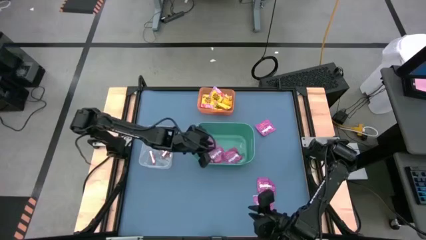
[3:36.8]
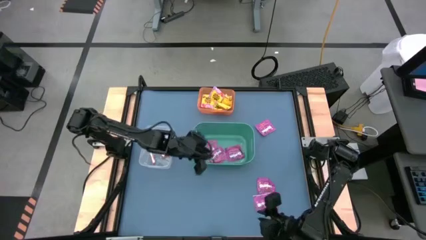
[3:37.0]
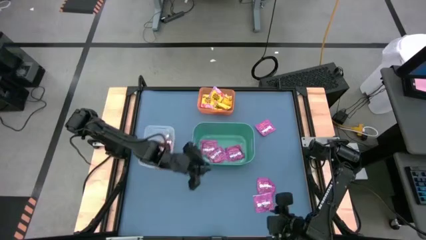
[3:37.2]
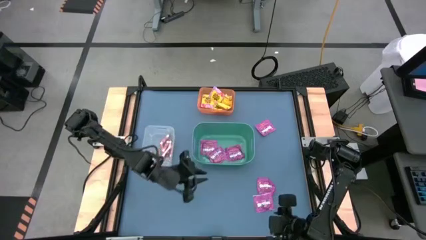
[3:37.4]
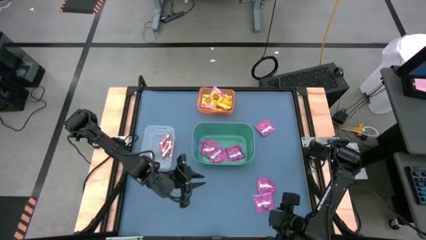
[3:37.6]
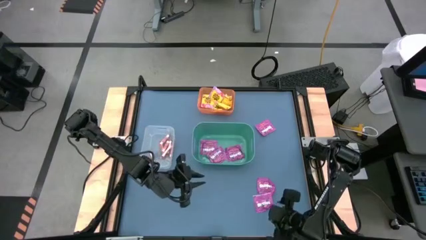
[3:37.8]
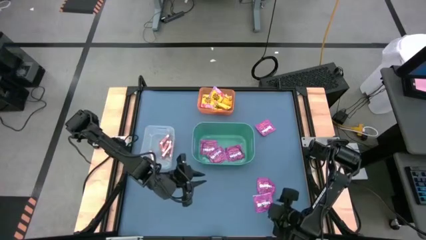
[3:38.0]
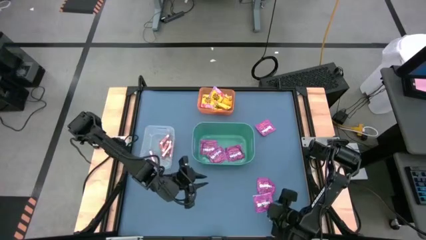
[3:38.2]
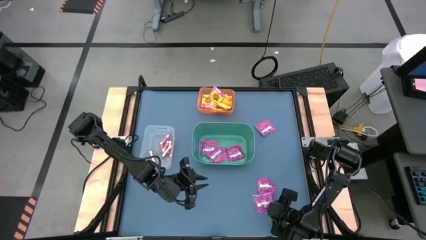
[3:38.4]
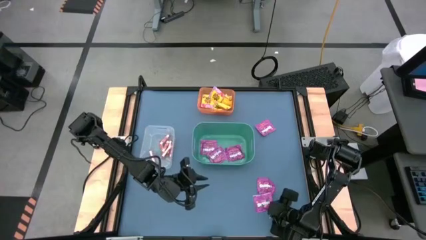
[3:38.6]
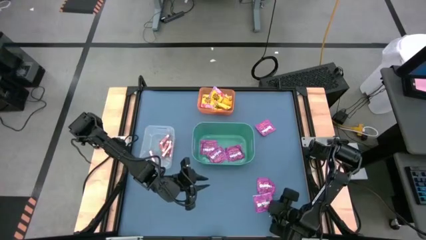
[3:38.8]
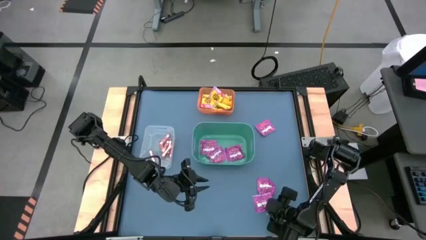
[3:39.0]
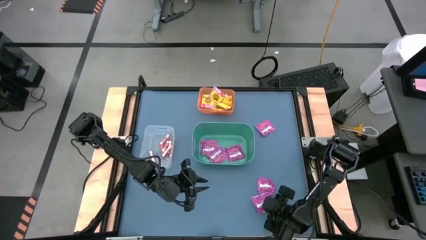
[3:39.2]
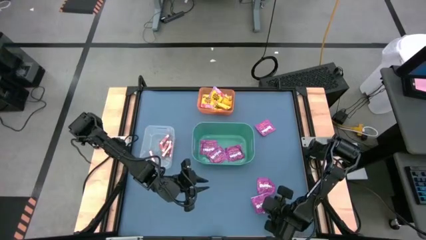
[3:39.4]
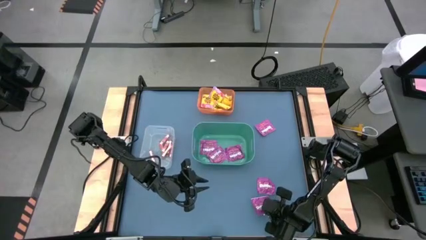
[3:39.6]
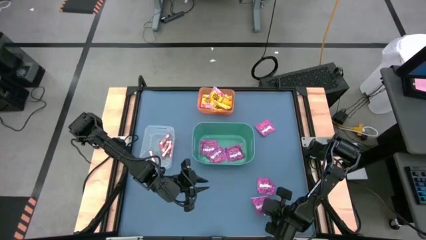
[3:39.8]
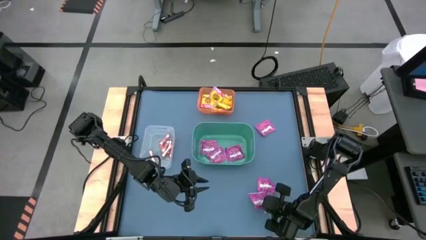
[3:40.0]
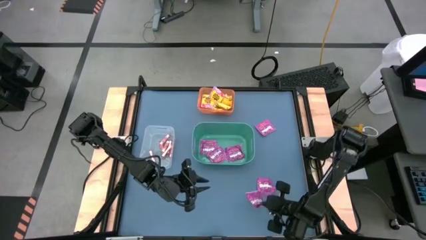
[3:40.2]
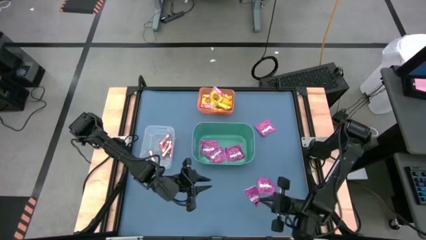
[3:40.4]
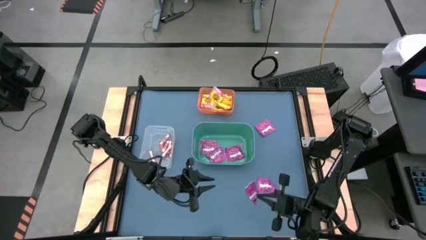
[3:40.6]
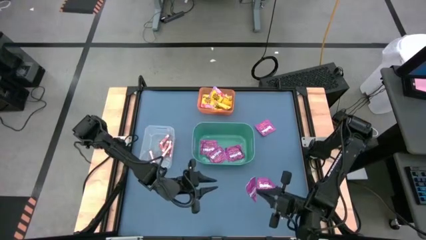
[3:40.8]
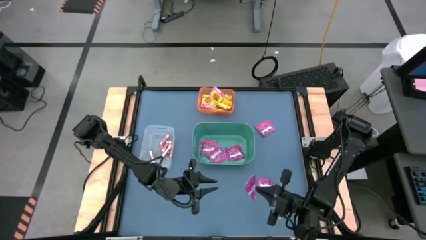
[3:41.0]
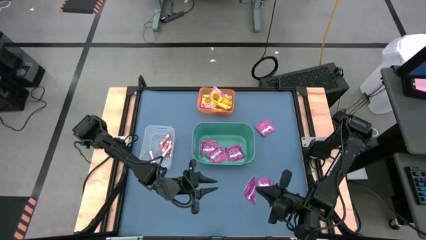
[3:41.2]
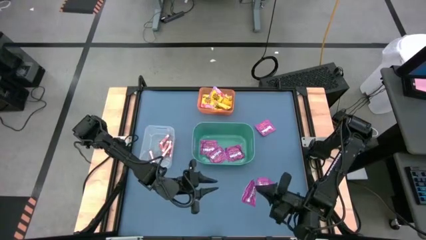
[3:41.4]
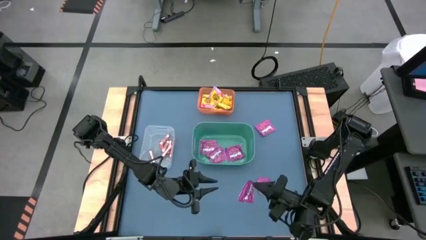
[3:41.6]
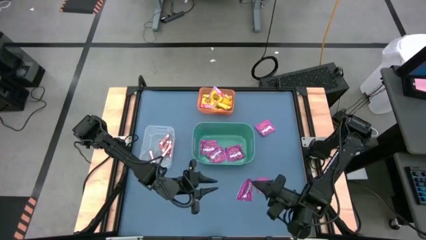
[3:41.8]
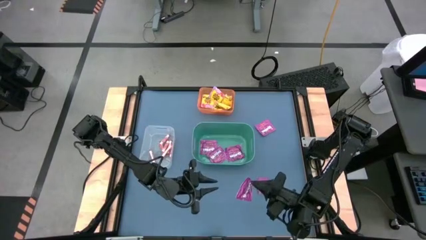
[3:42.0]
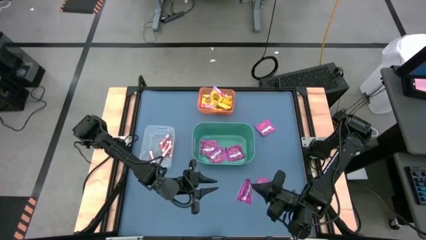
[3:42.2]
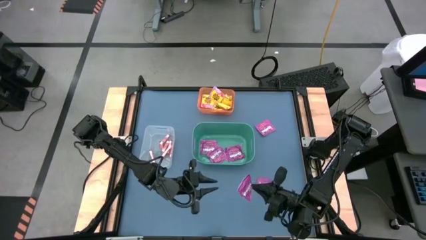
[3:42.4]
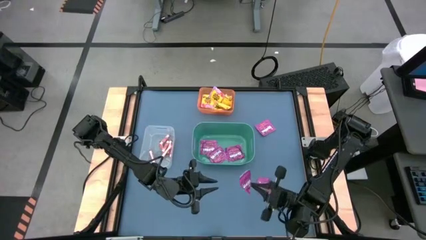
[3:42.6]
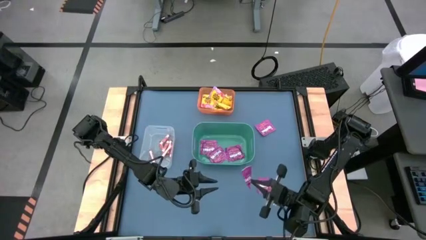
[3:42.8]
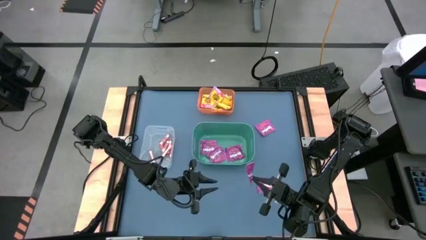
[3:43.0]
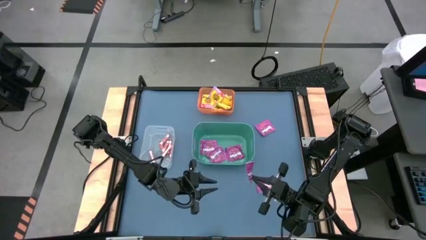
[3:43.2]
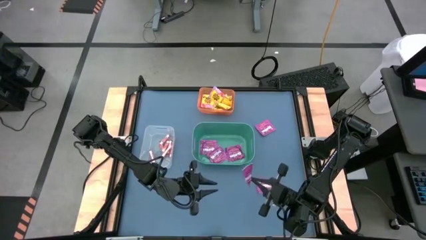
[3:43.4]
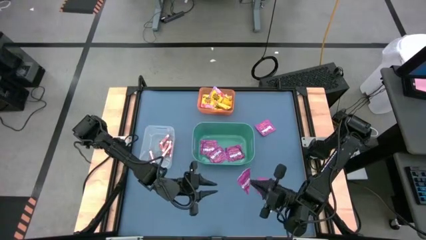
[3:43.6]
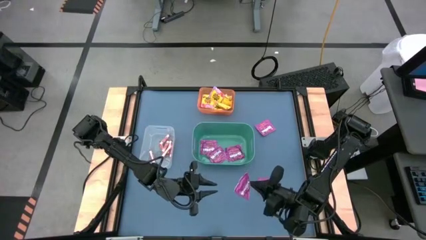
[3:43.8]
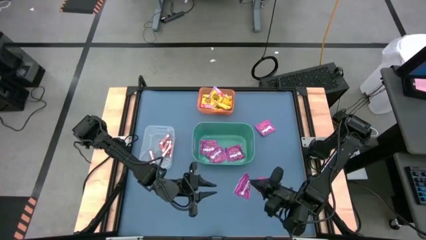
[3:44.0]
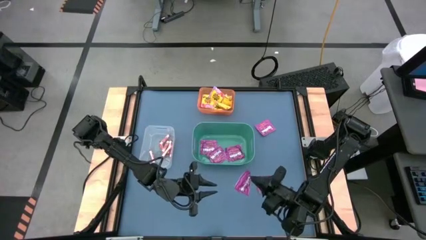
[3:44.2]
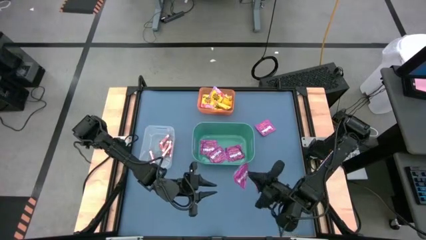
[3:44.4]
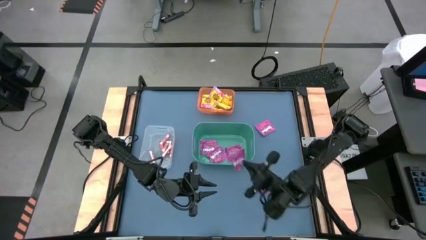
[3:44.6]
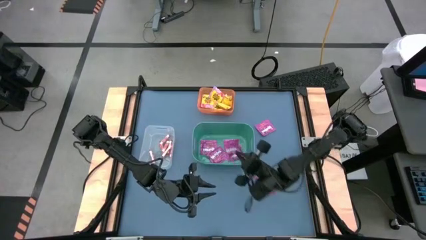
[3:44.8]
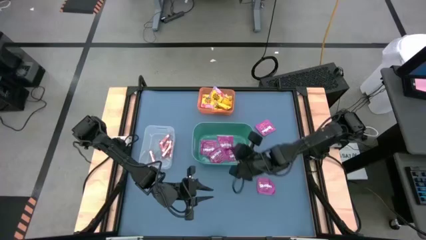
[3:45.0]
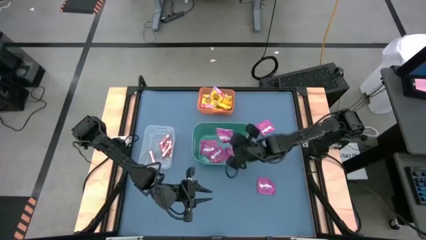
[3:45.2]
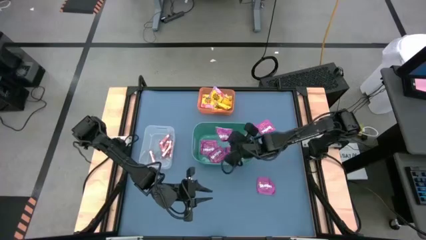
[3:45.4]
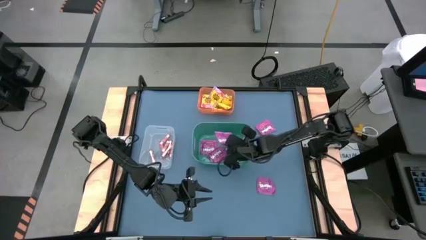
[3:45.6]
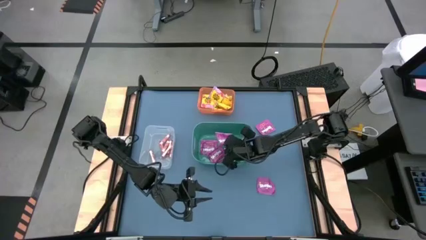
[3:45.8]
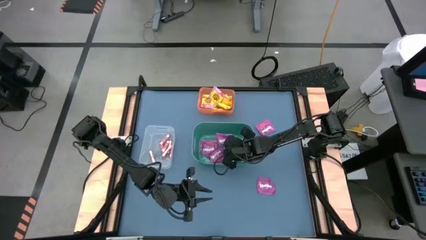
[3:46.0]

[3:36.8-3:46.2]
Task: Sort candy
Put the purple candy into the green bin

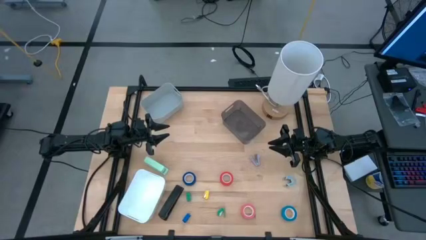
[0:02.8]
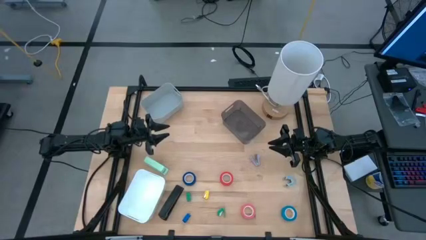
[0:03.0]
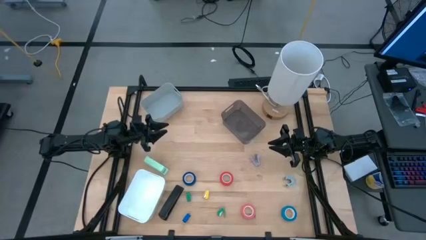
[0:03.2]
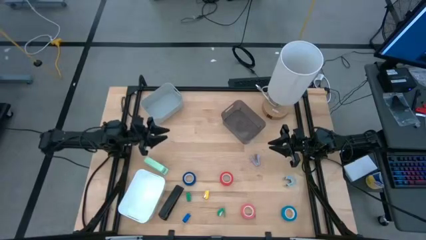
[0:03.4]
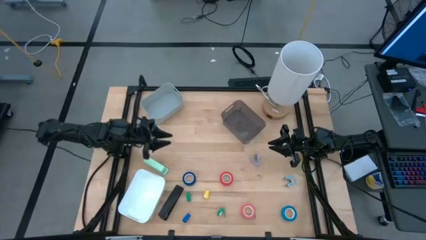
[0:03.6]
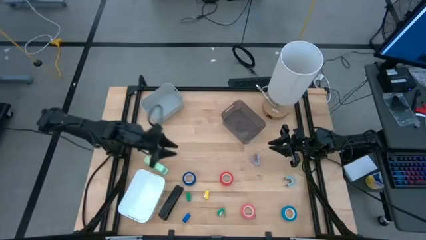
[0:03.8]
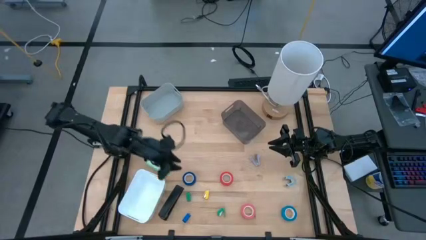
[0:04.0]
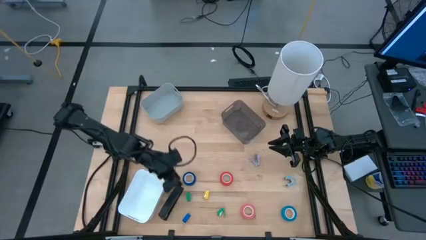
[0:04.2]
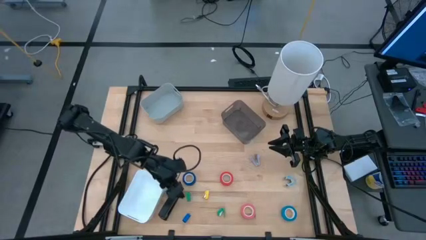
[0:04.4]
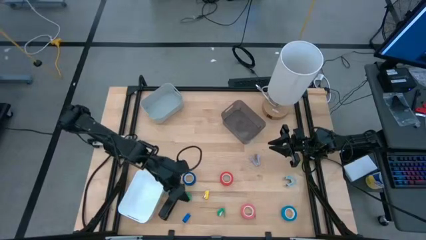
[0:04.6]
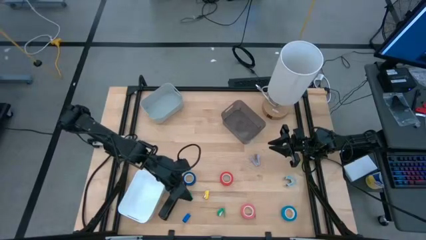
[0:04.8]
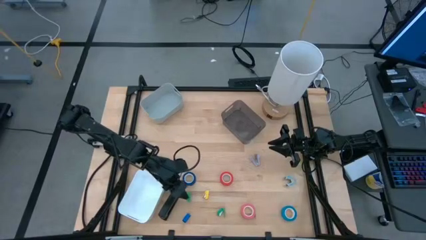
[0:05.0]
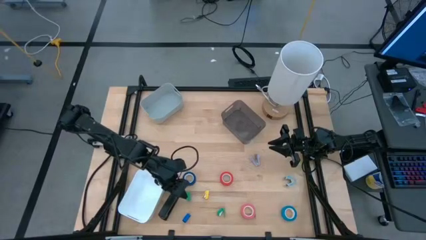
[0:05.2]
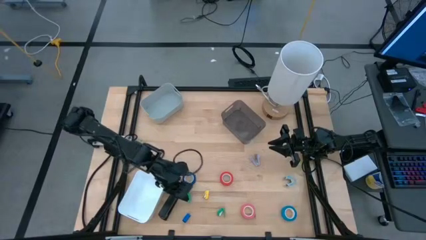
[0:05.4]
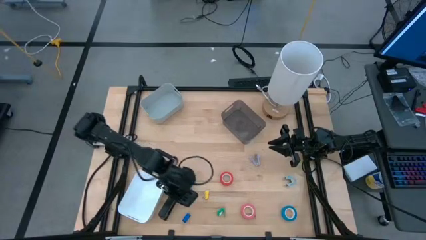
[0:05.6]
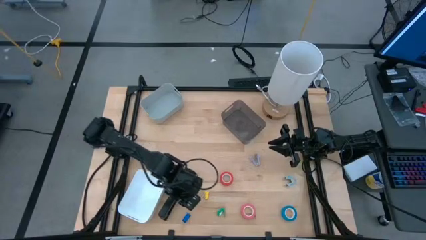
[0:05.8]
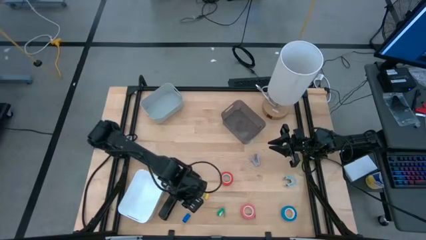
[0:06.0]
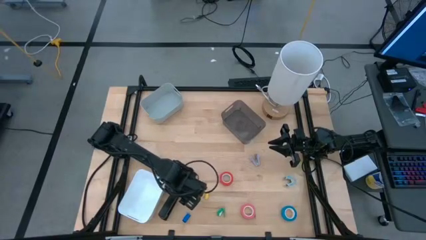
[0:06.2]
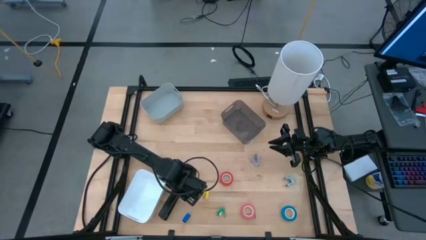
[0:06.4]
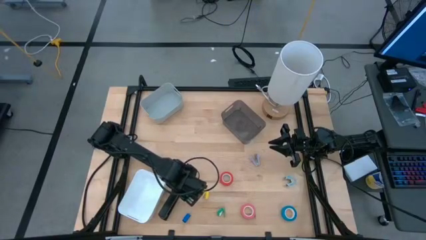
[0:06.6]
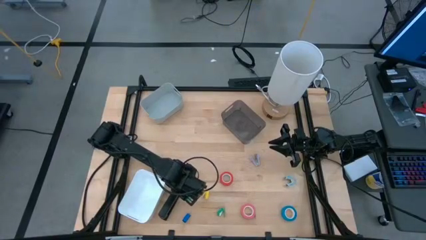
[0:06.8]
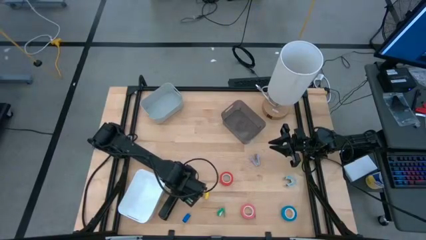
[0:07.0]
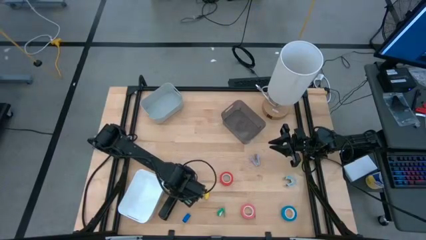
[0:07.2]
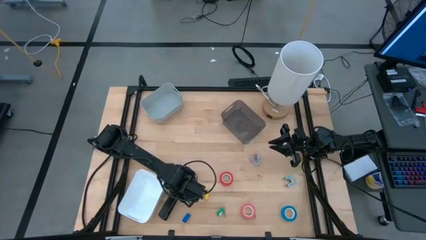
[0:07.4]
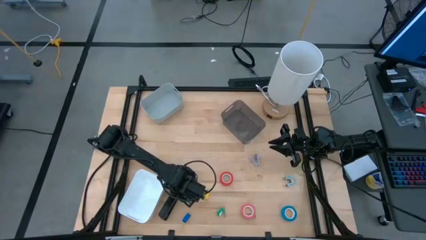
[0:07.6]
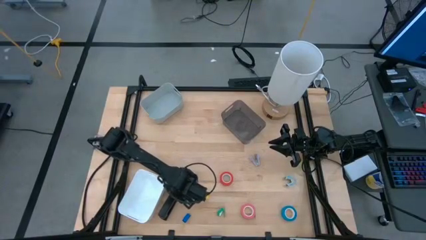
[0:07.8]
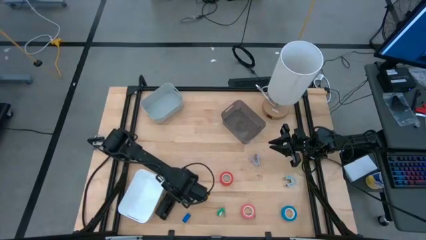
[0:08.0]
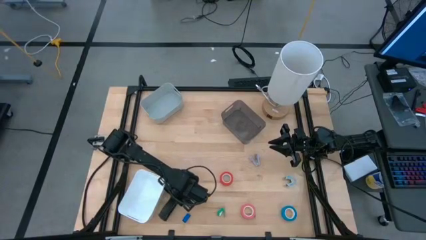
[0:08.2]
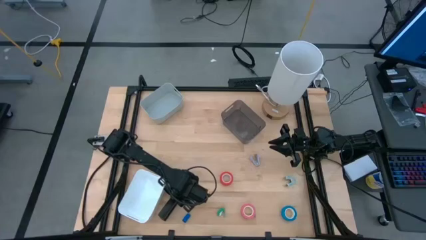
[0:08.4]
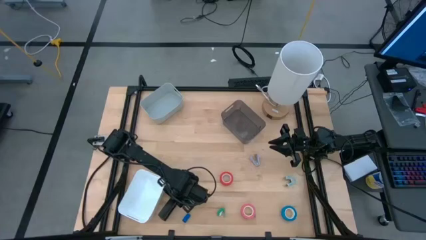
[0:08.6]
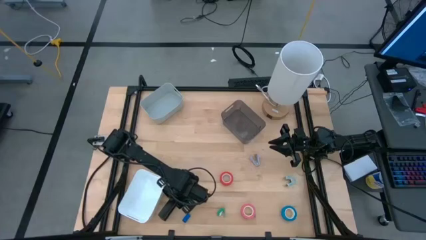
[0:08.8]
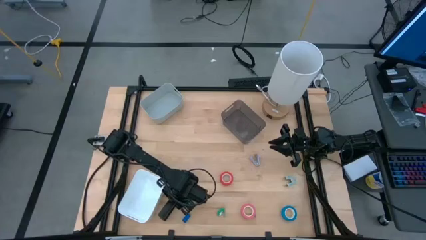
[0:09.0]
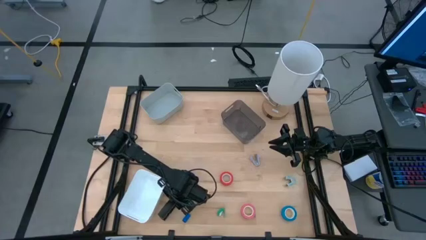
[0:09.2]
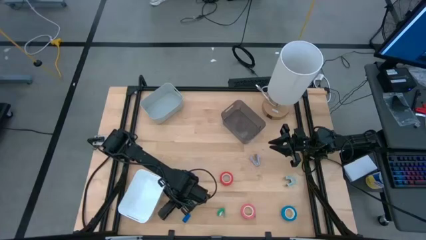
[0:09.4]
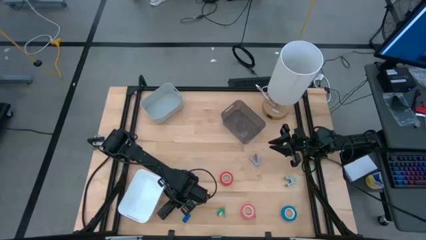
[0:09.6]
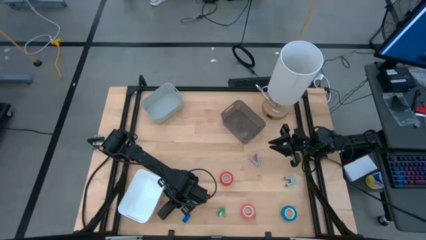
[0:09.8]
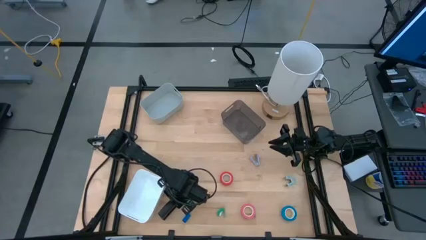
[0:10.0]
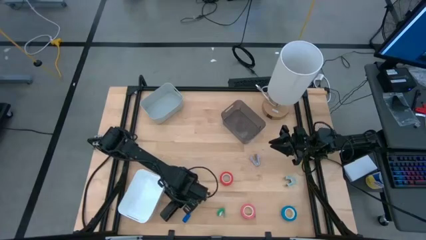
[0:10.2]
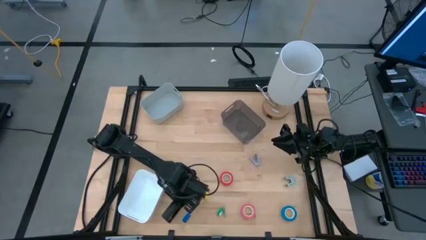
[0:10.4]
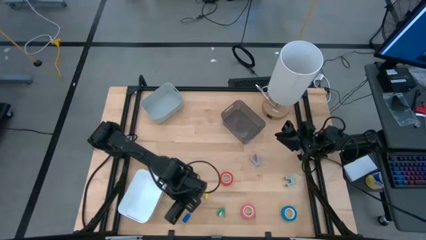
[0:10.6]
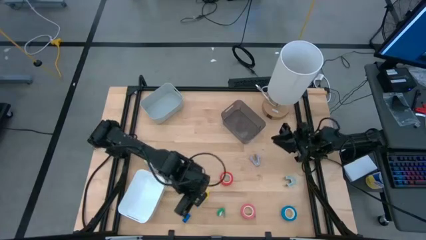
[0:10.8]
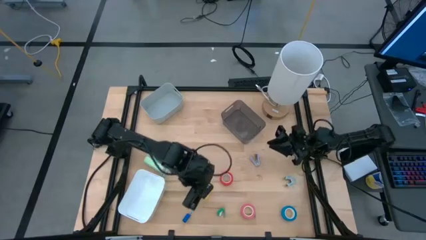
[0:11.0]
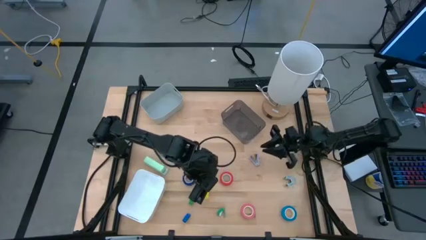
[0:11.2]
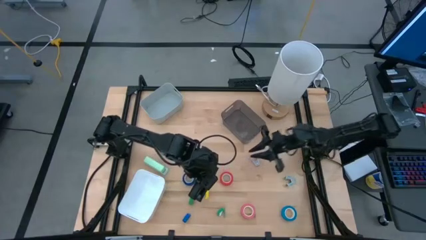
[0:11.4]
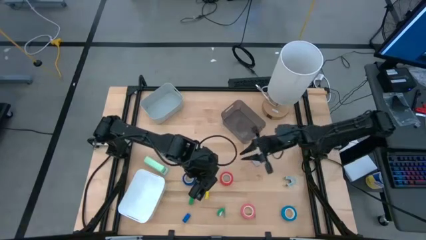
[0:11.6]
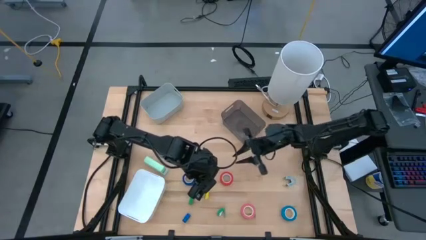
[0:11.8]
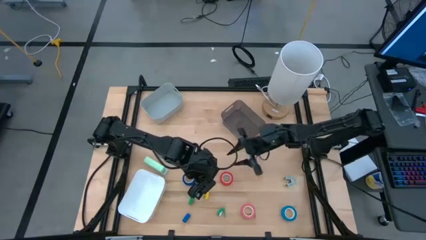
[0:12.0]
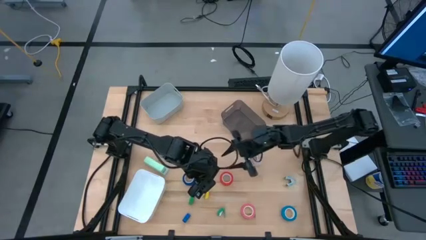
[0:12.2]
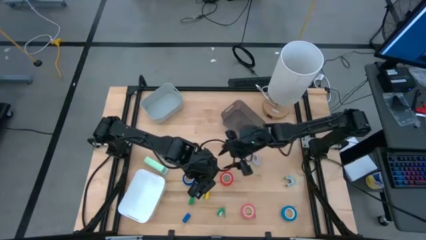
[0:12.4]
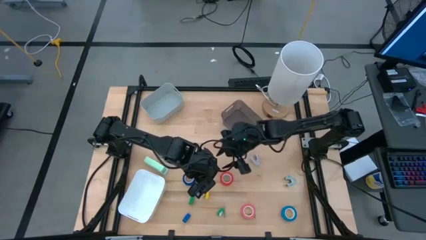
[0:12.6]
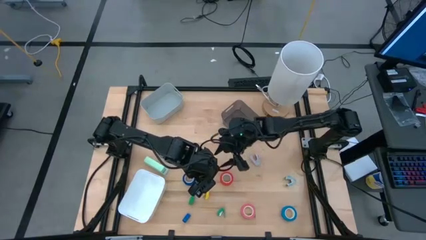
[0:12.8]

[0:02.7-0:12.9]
Task: Pick and place Stapler, Stapler remover, tape
Put the large black stapler into the black bin
